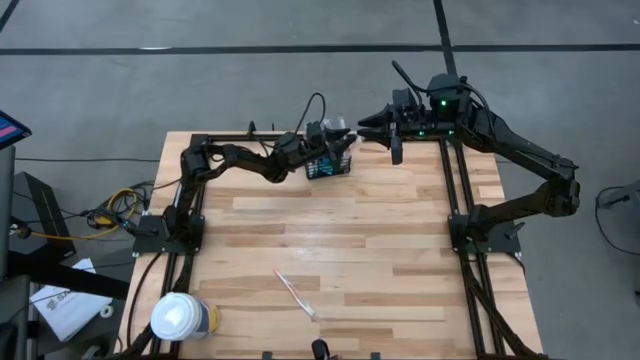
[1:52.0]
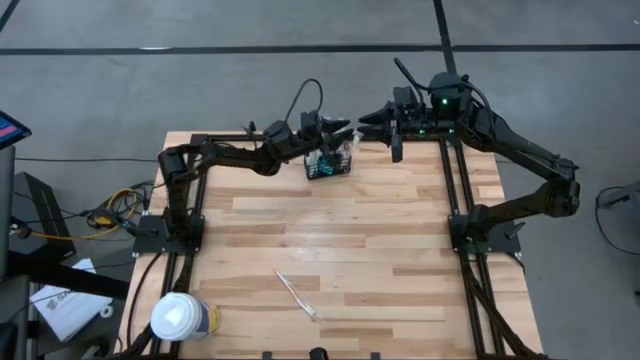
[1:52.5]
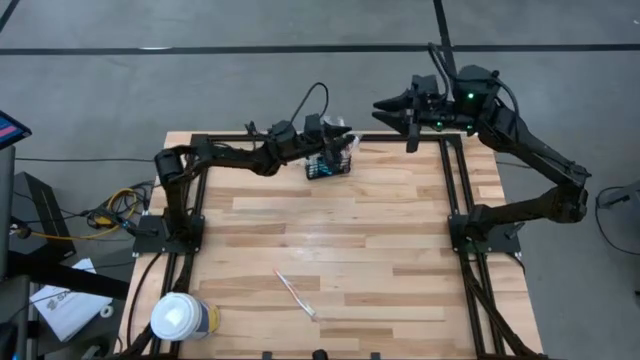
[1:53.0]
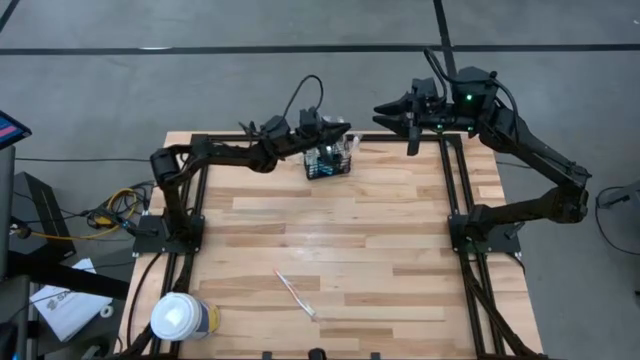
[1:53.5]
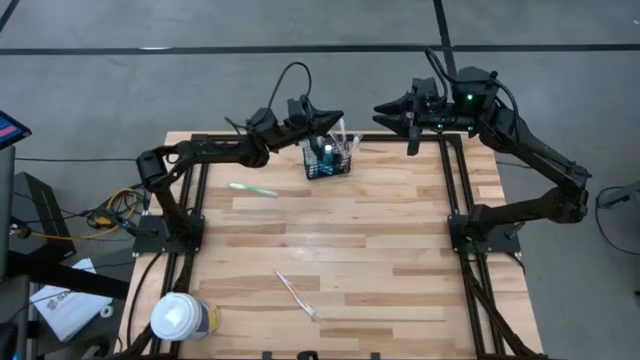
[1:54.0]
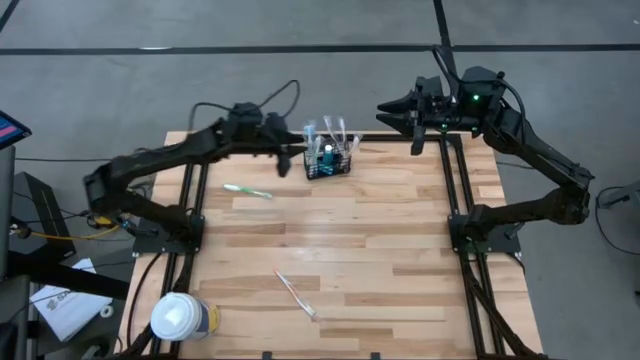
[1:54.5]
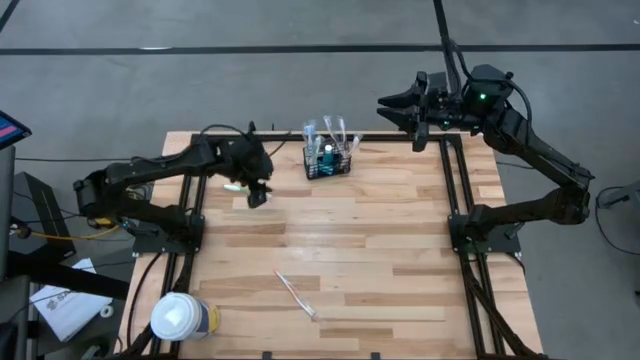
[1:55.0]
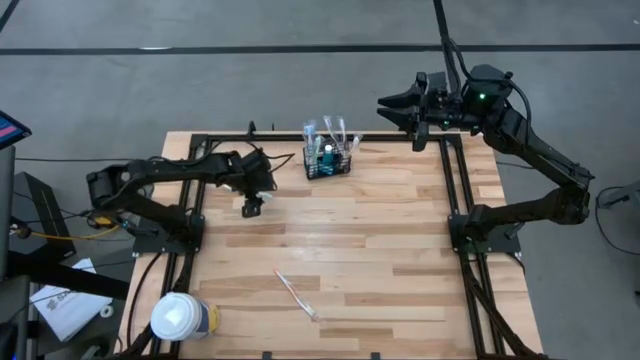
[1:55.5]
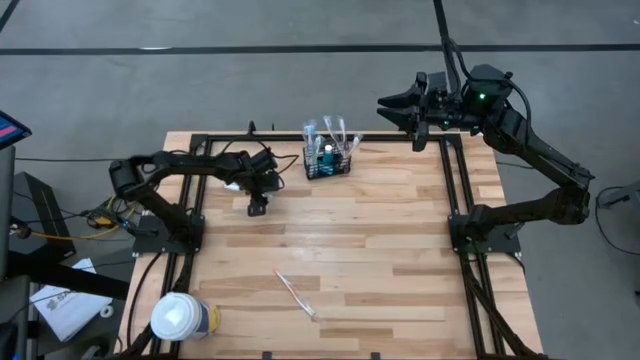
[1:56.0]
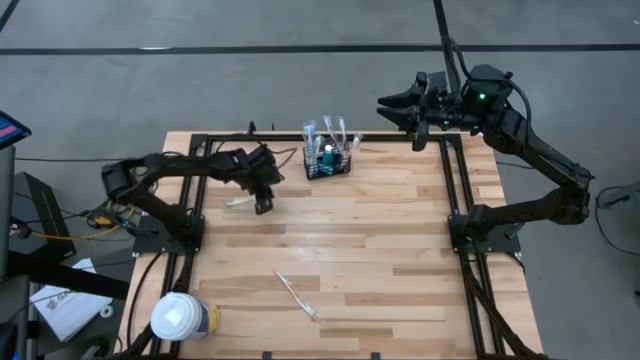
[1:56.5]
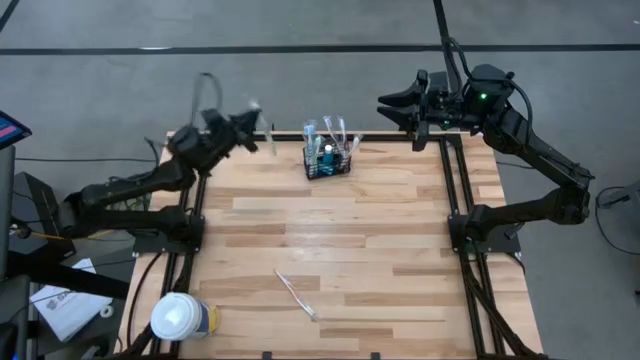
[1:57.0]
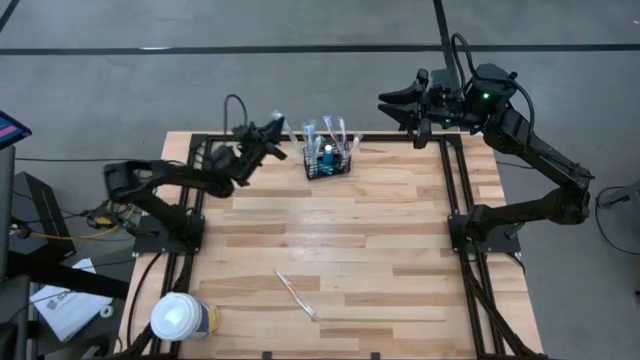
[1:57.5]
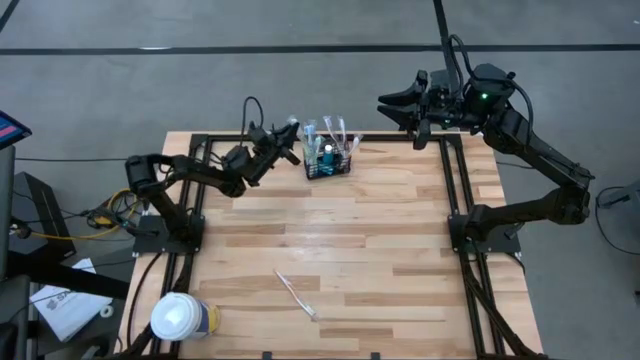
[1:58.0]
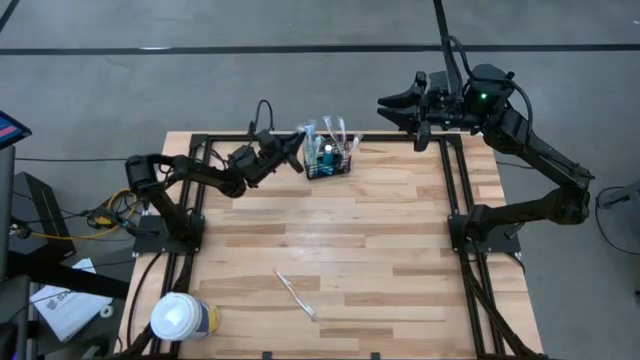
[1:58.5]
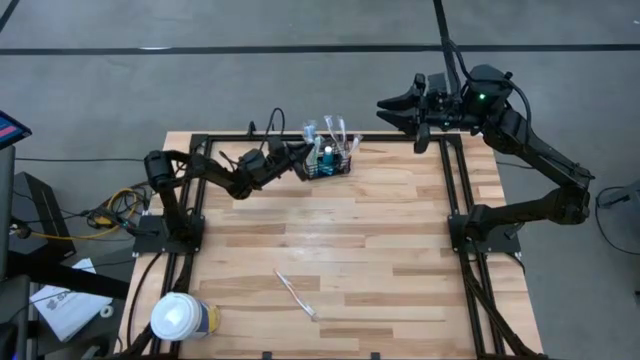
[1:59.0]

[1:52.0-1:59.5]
Task: Pick & Place toothbrushing station
Put the green toothbrush into the black wire organizer

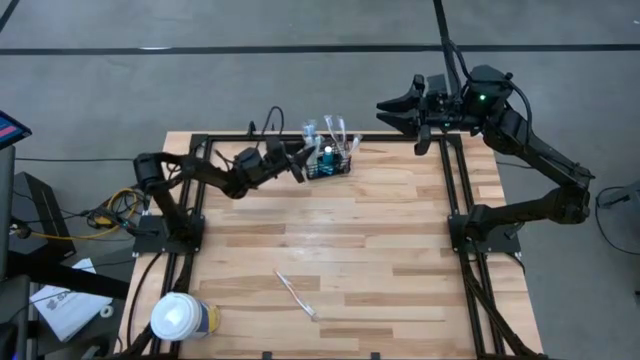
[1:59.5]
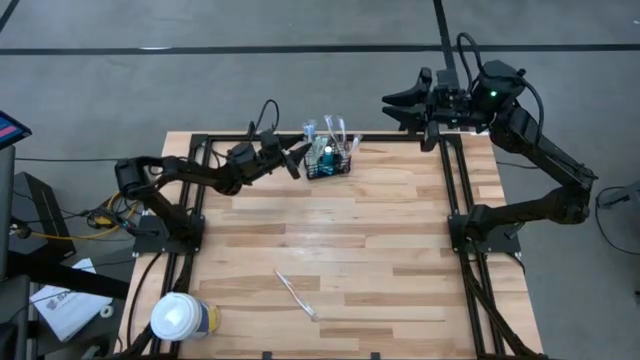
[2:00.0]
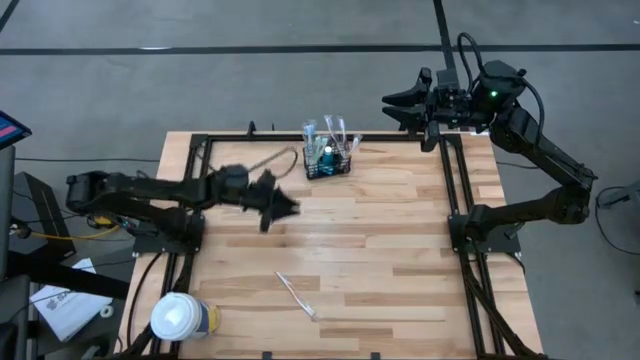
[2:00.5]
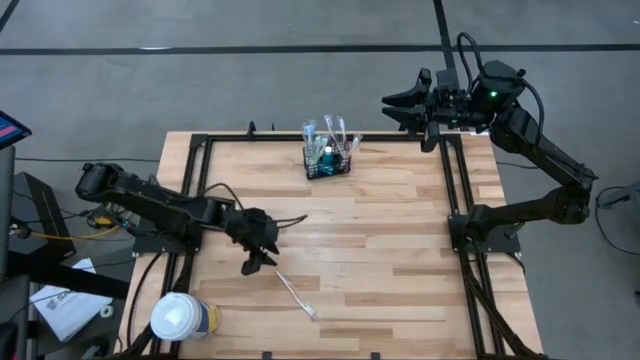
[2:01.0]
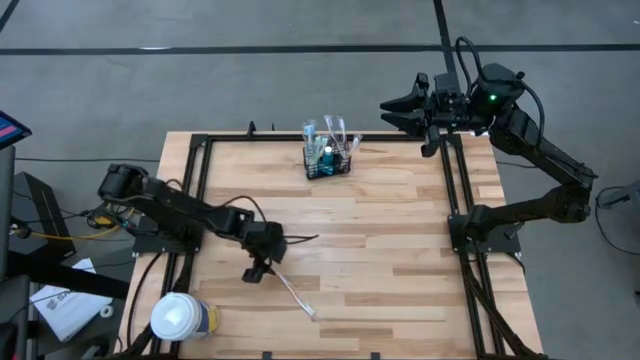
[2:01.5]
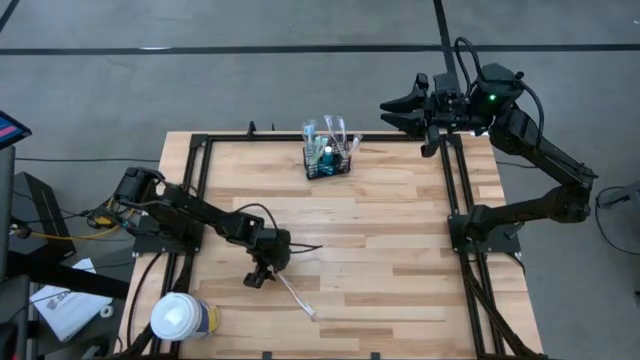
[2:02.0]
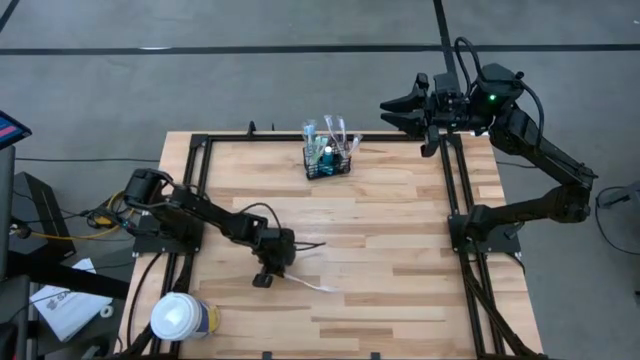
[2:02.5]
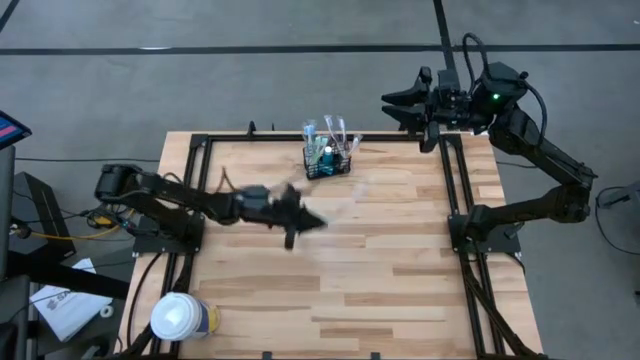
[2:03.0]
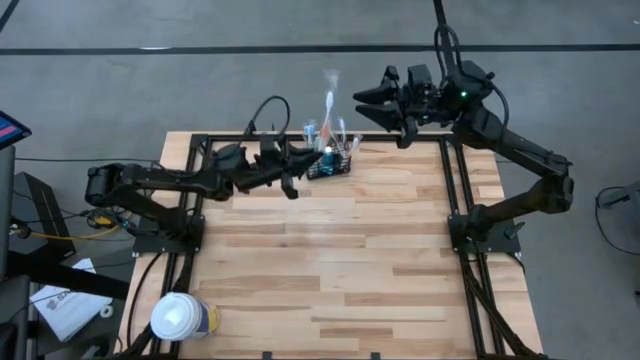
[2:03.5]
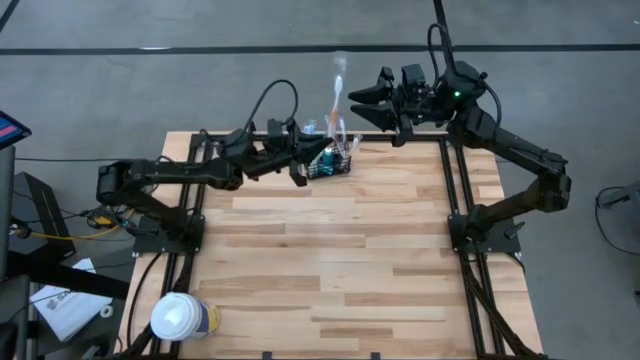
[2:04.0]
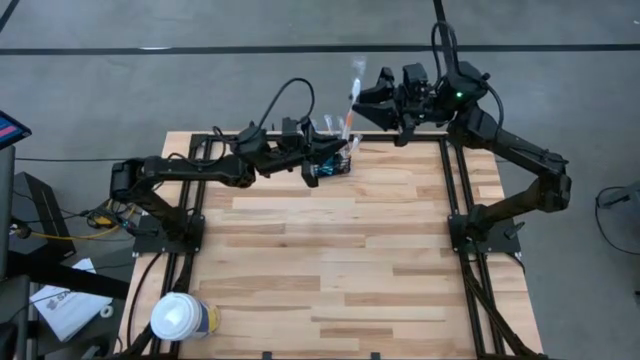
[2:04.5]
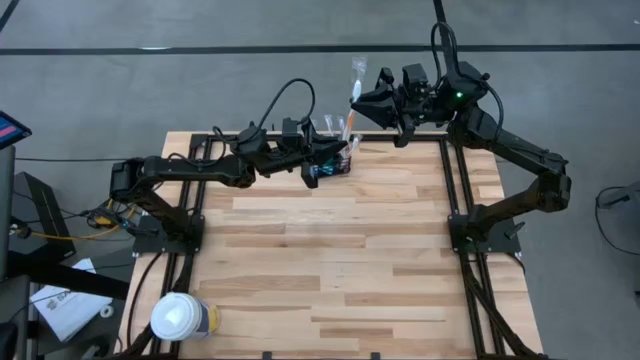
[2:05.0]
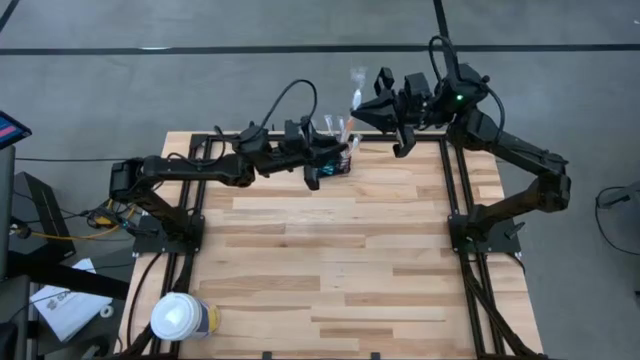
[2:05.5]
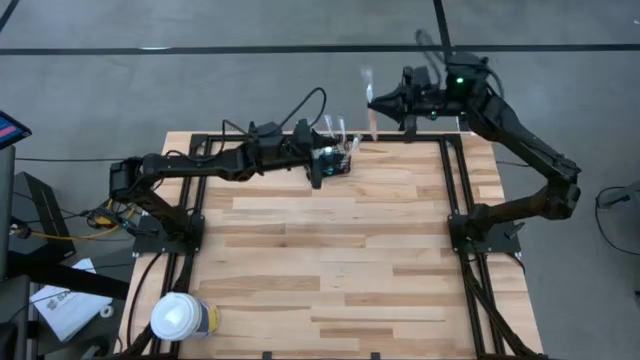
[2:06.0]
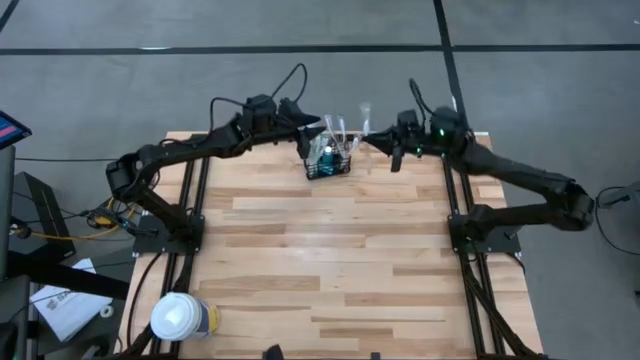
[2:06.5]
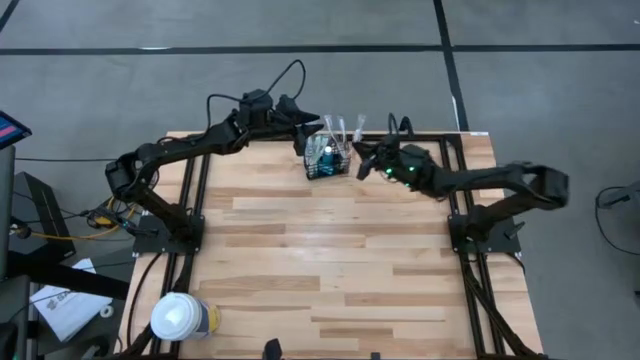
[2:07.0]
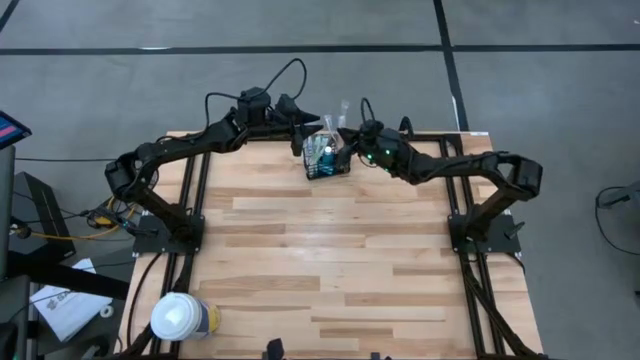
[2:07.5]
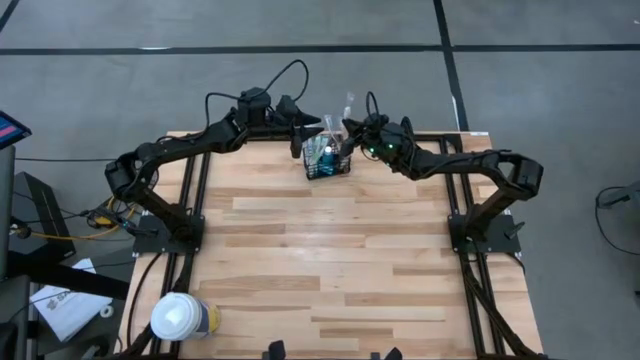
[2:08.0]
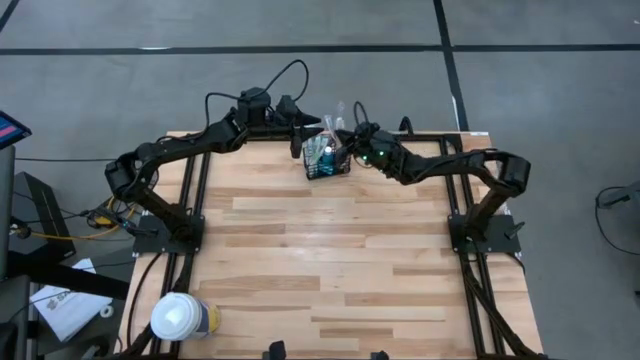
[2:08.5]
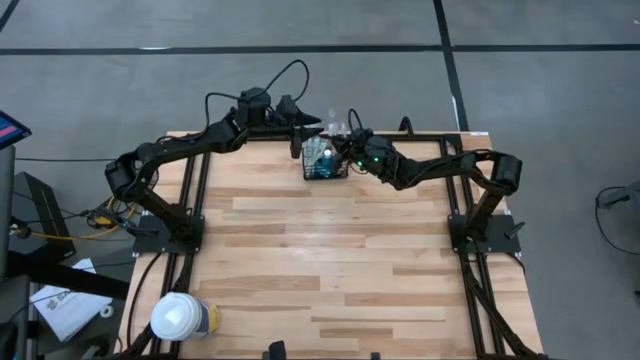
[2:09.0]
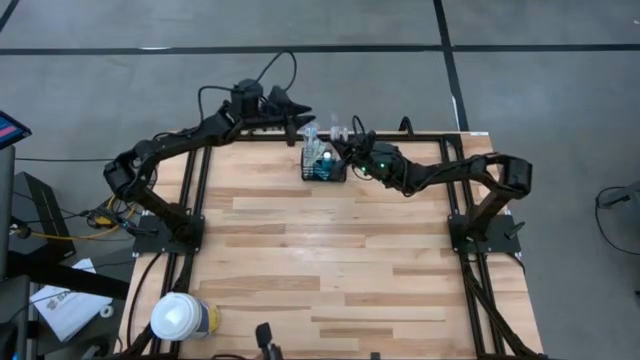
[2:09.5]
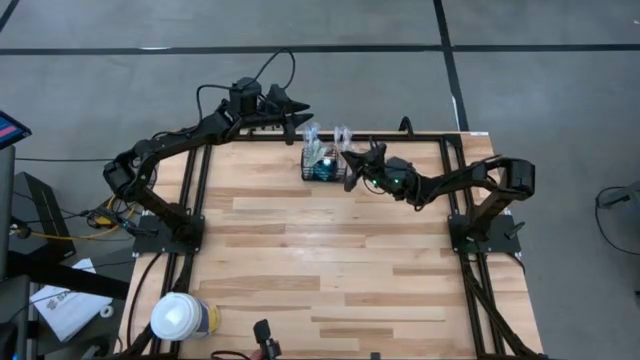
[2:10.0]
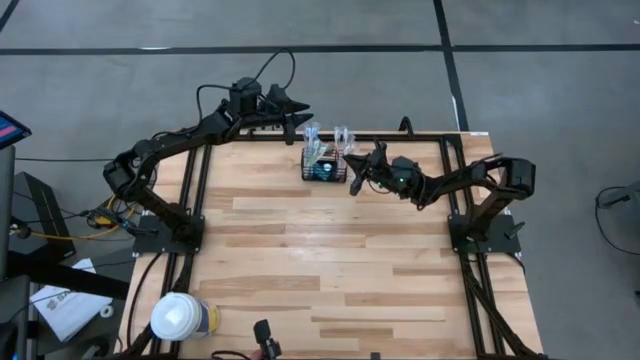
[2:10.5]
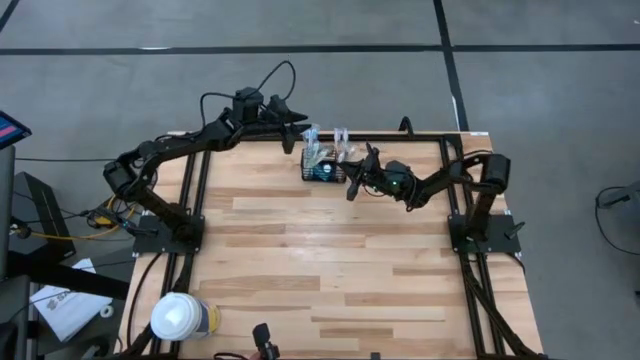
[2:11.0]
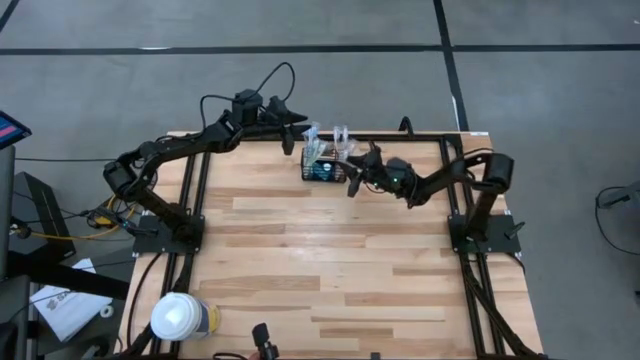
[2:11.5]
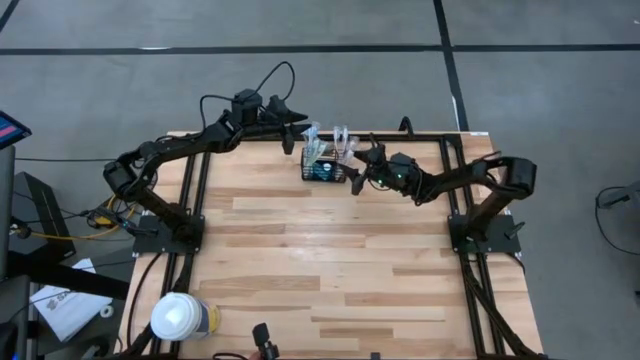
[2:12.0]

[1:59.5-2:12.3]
Put the orange toothbrush into the black wire organizer

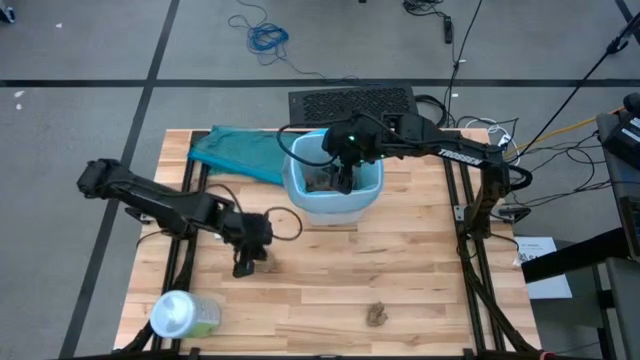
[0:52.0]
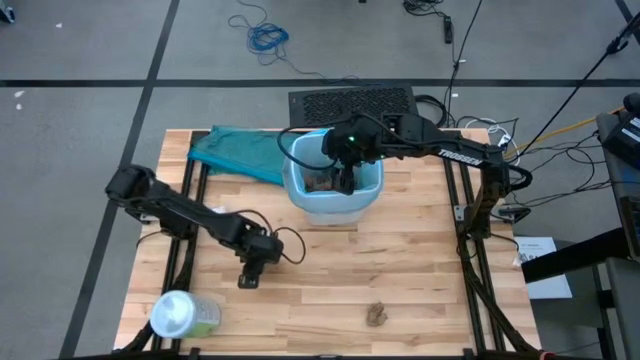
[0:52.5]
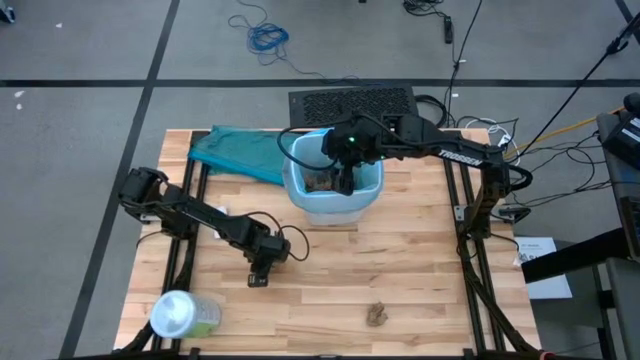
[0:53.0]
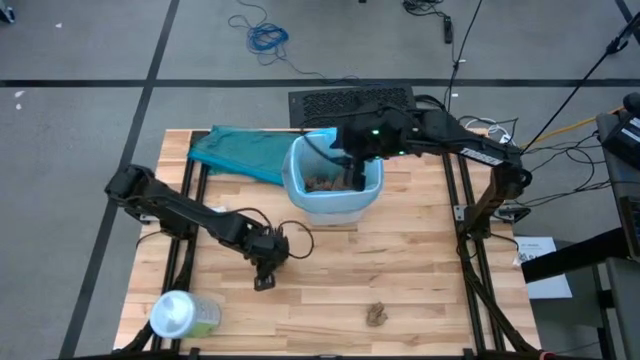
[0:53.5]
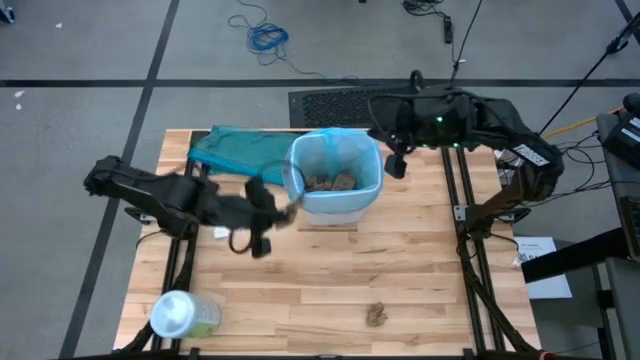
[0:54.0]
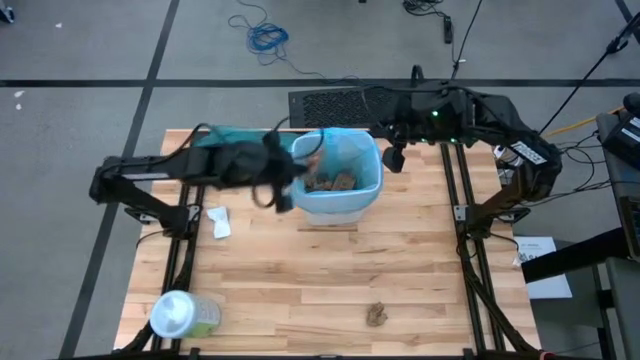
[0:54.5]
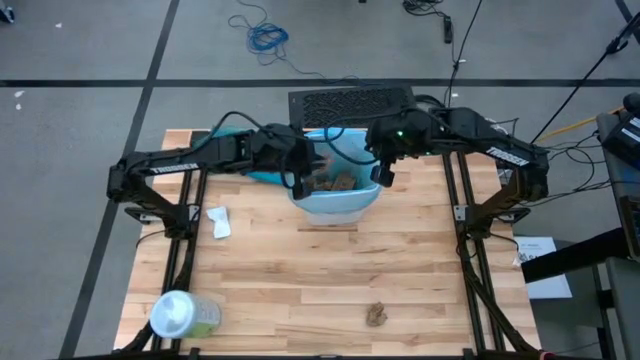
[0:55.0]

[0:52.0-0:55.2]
Task: place trash/remove bag and relplace
Put the brown napkin into the trash bin
